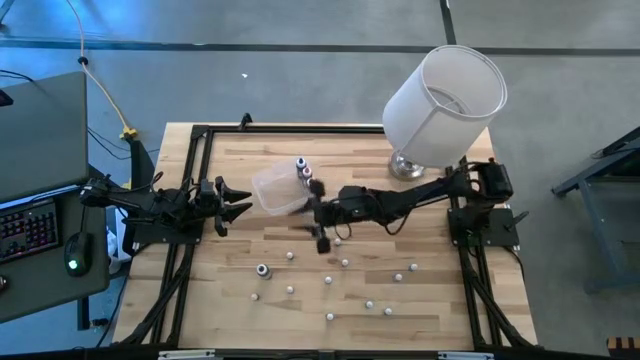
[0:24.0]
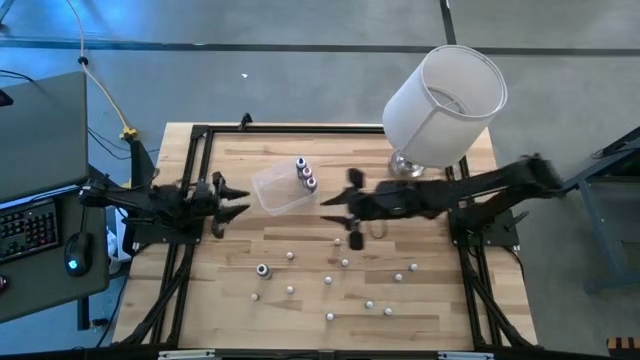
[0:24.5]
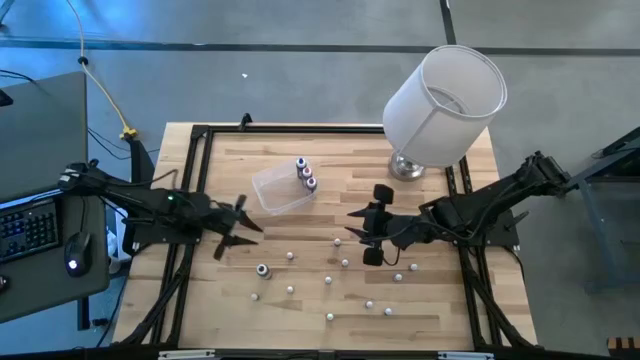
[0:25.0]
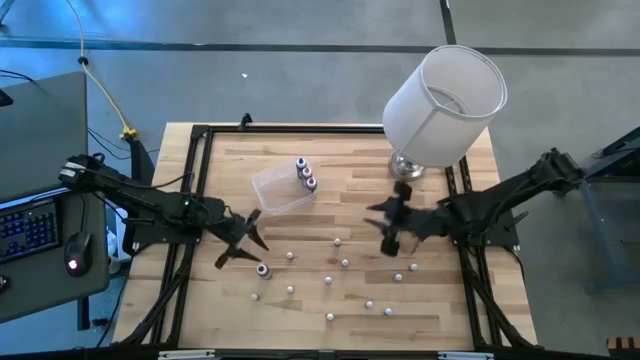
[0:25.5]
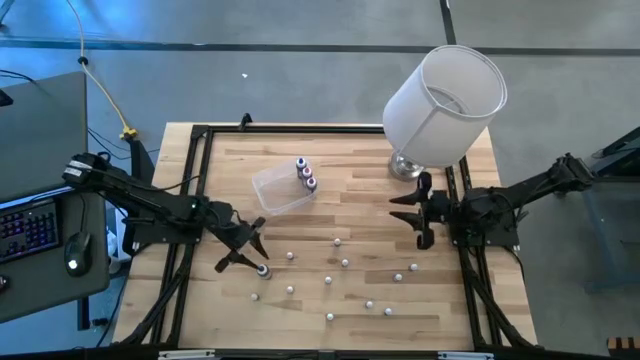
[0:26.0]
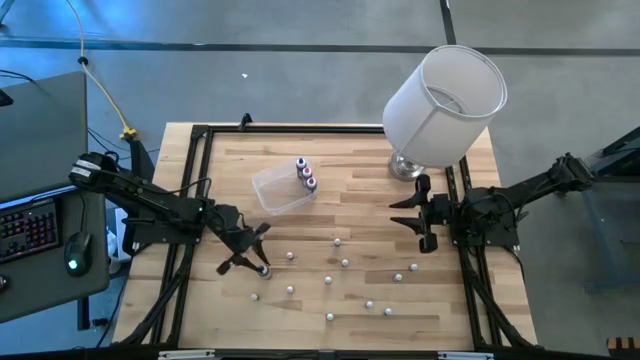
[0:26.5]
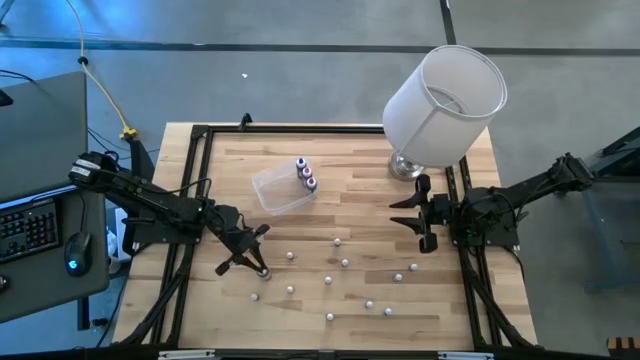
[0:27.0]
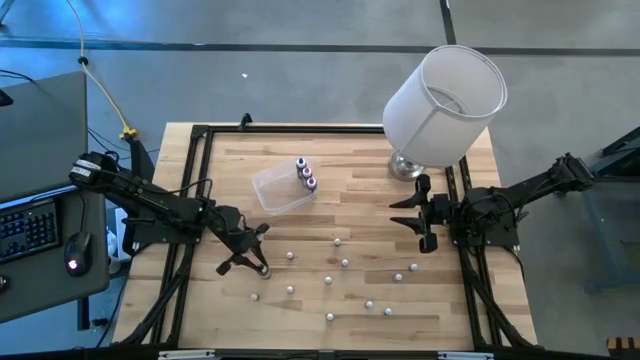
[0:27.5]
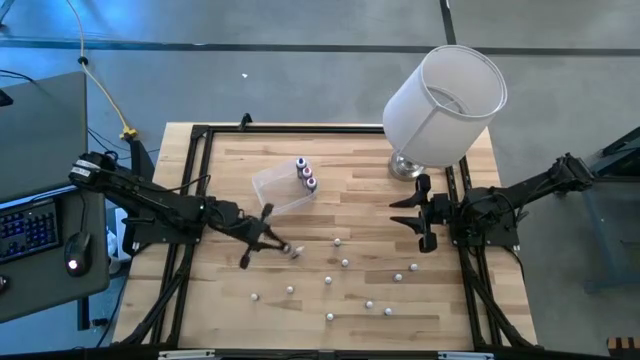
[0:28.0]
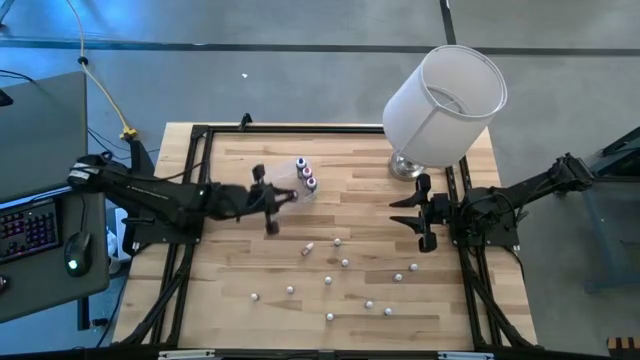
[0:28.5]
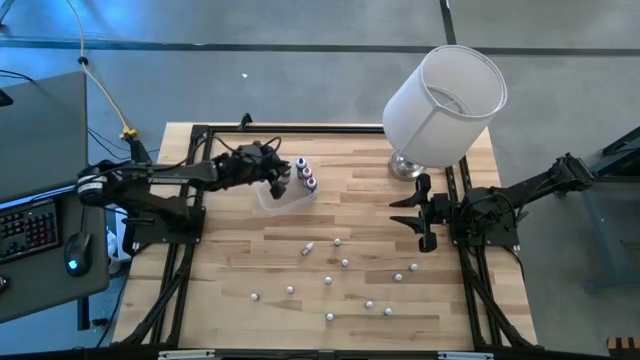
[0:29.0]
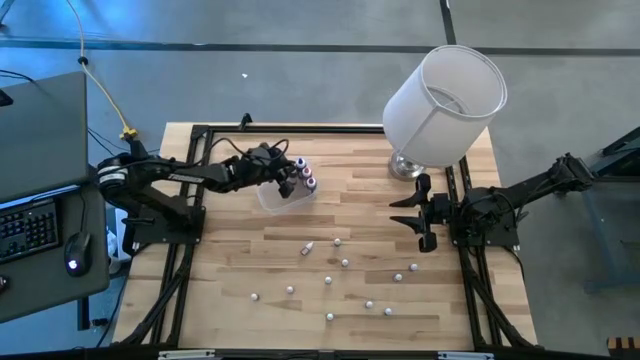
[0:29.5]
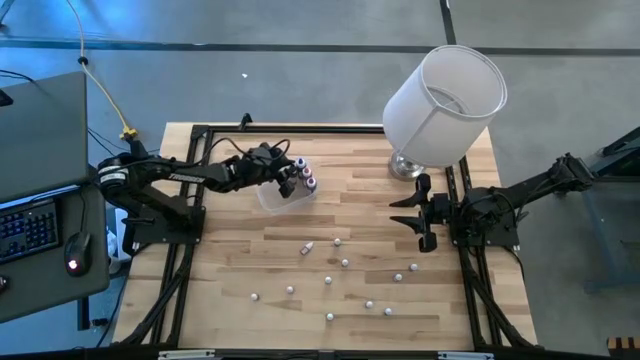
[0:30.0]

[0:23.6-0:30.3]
Task: Pick & Place food coloring
Put the big black food coloring bottle into the transparent bin

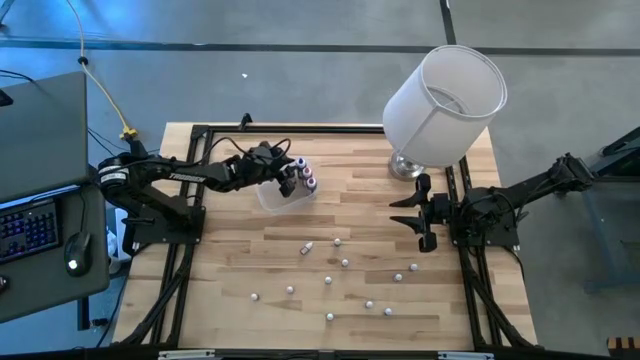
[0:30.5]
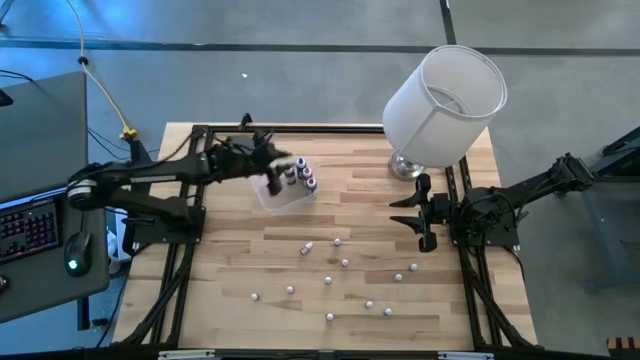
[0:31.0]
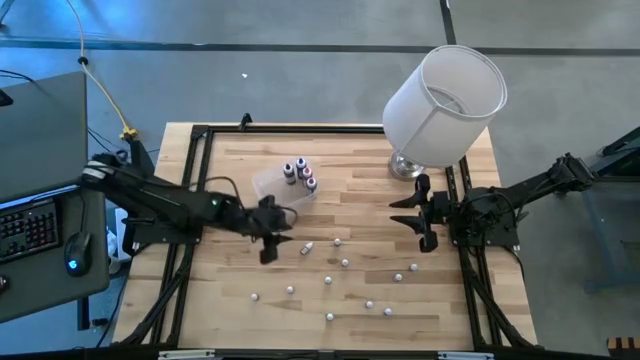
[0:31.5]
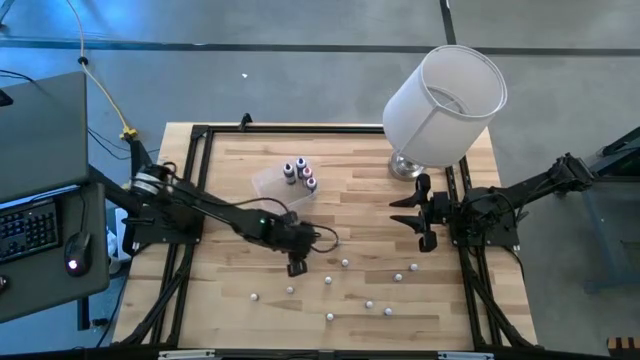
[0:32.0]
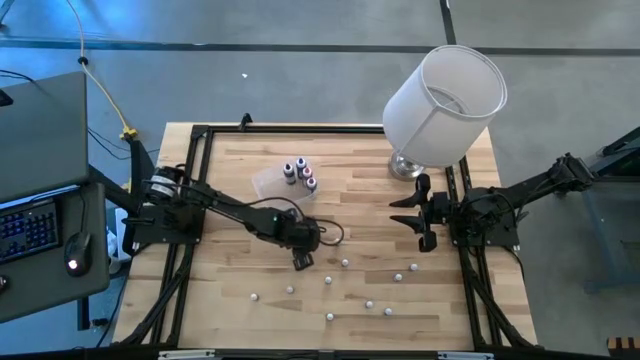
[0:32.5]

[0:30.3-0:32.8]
Put the small red food coloring bottle into the transparent bin

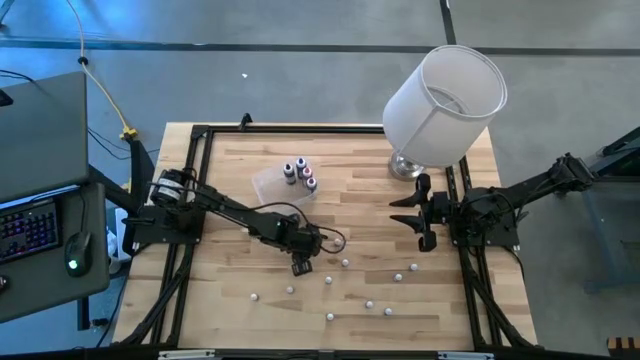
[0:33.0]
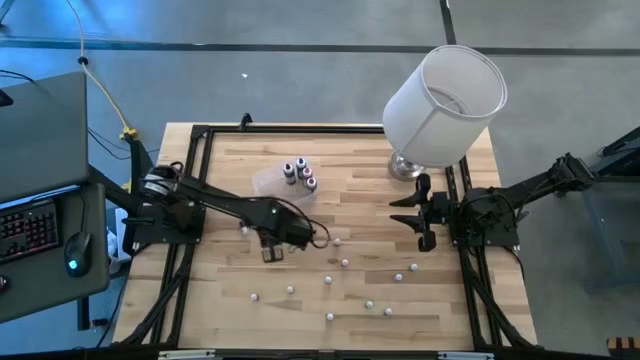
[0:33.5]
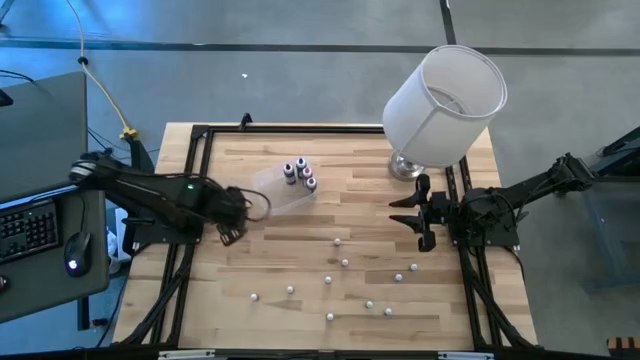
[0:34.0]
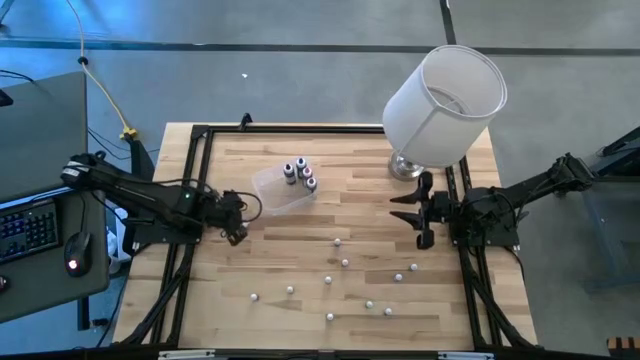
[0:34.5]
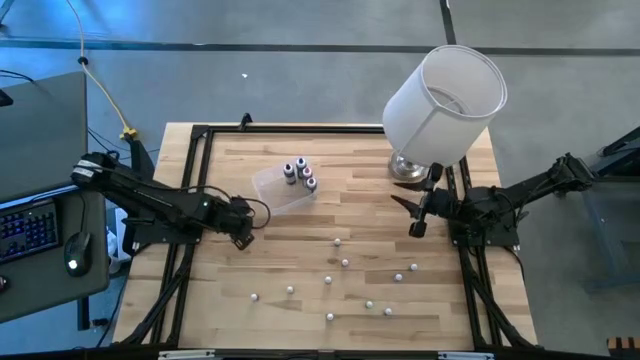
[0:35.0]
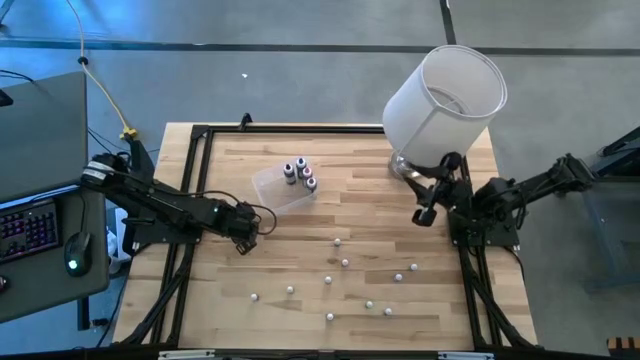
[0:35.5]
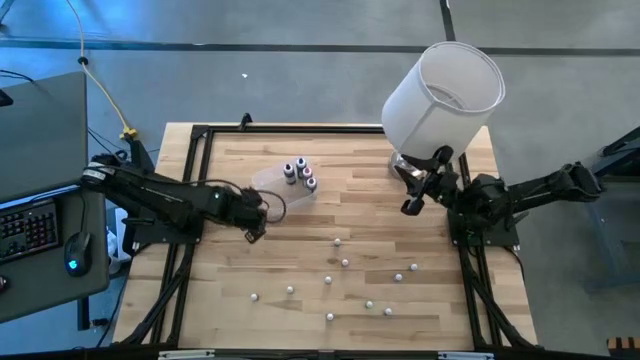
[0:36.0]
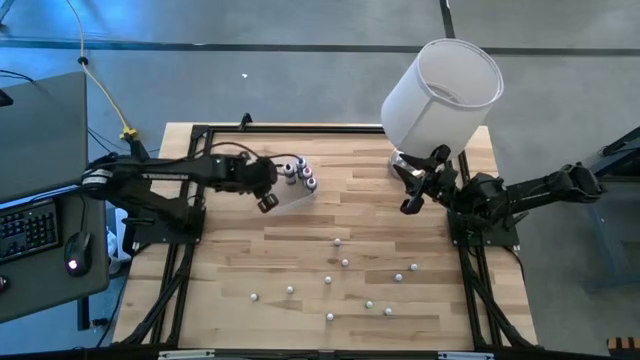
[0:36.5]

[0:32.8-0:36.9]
Put the small red food coloring bottle into the transparent bin

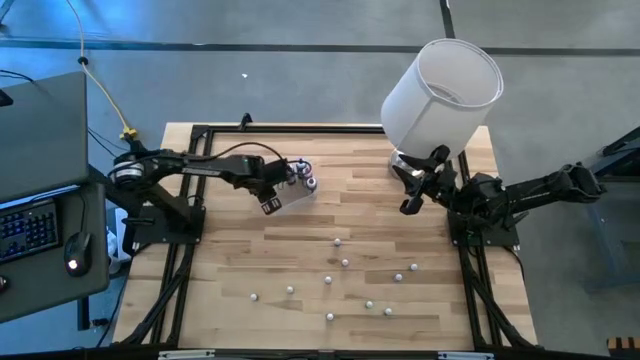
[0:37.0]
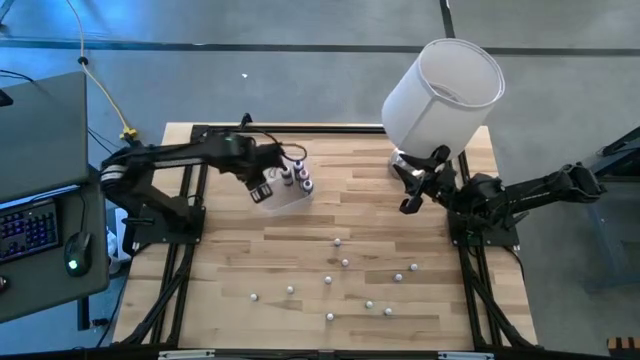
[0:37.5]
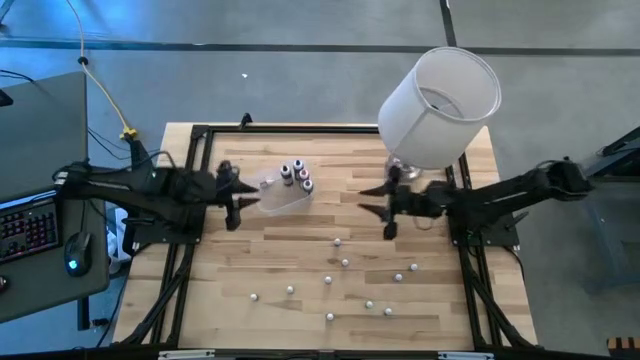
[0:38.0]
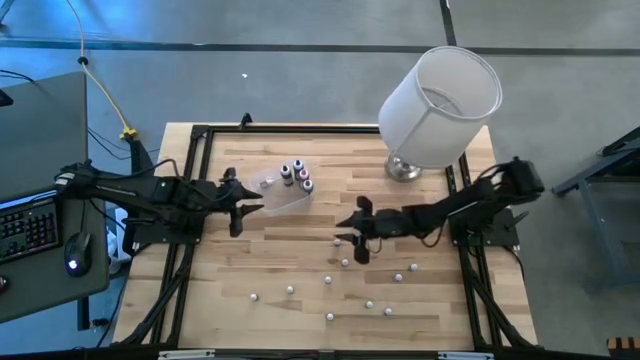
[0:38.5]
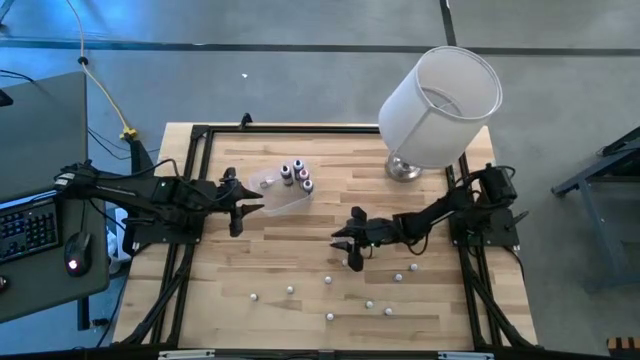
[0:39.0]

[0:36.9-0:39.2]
Put the small blue food coloring bottle into the transparent bin

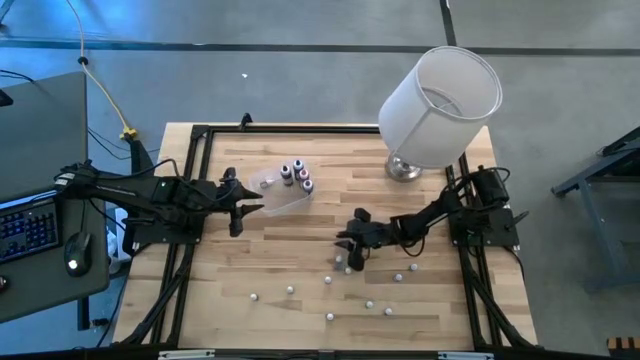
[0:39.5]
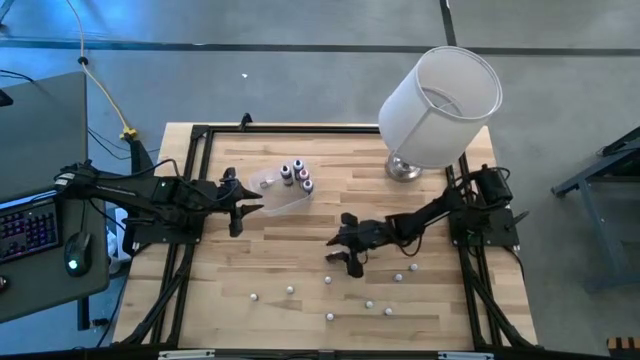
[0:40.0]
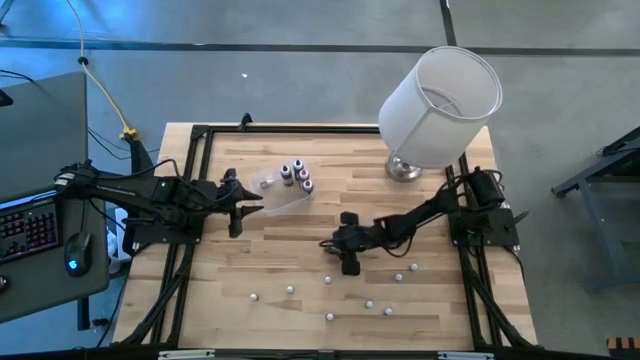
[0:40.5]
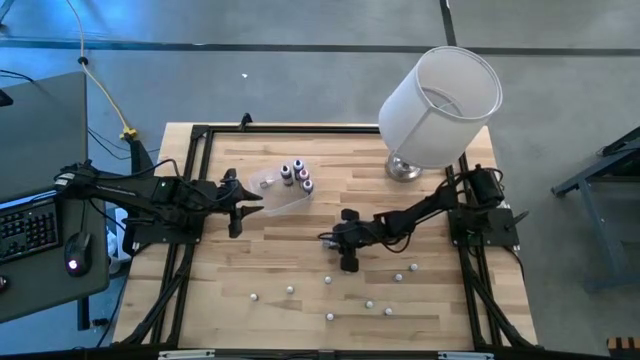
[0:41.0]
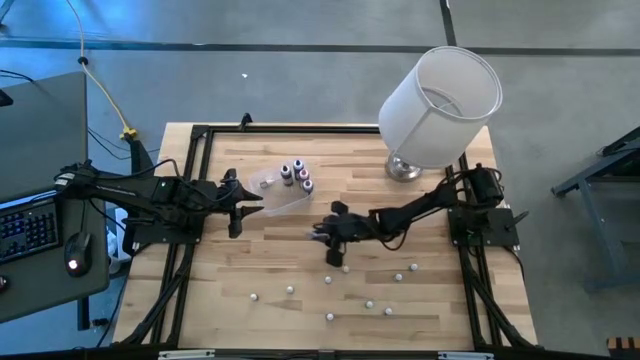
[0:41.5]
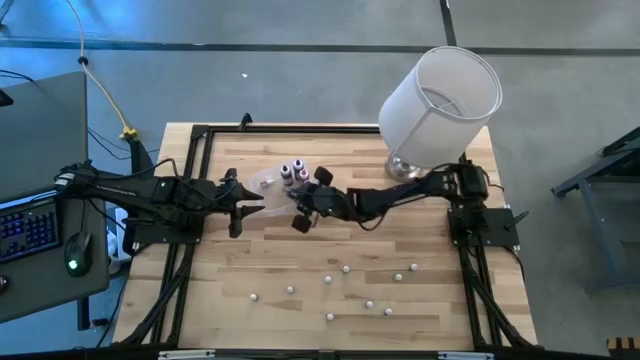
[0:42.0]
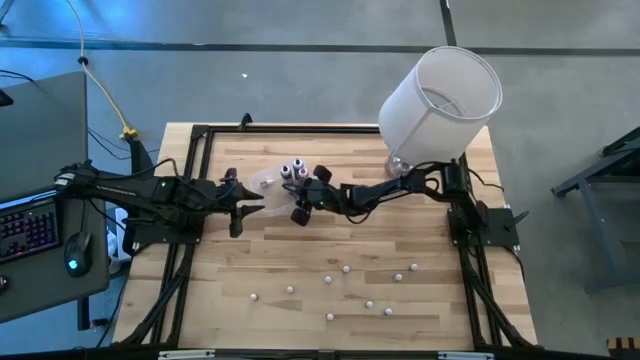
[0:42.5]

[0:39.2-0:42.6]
Put the small blue food coloring bottle into the transparent bin

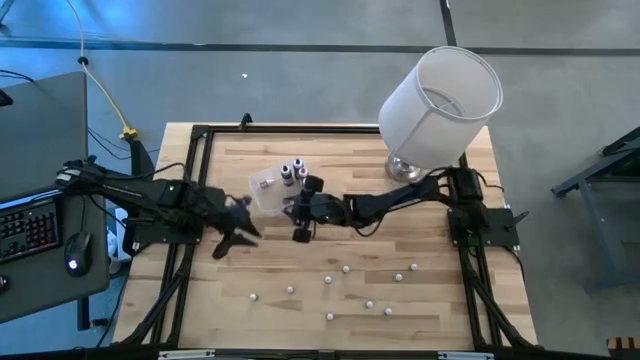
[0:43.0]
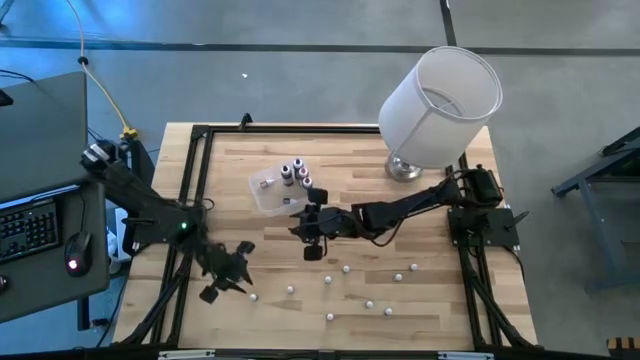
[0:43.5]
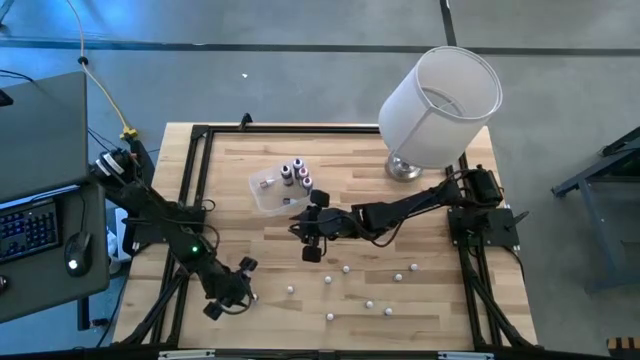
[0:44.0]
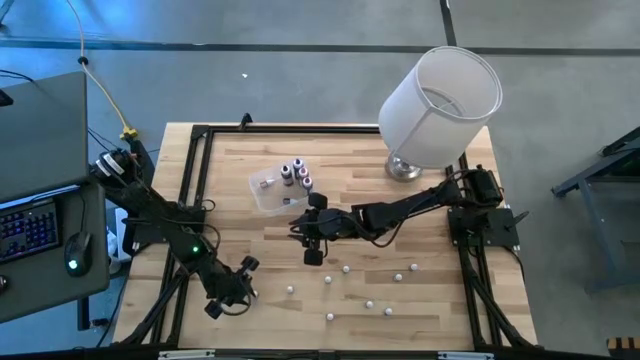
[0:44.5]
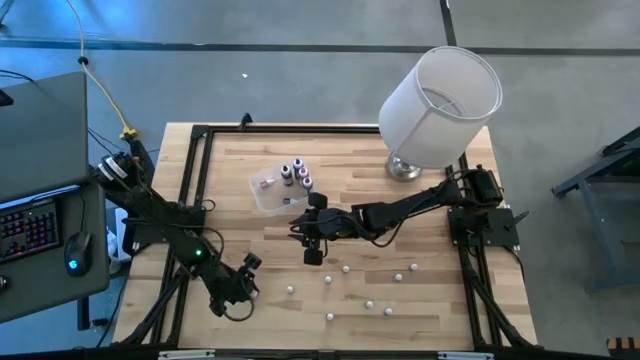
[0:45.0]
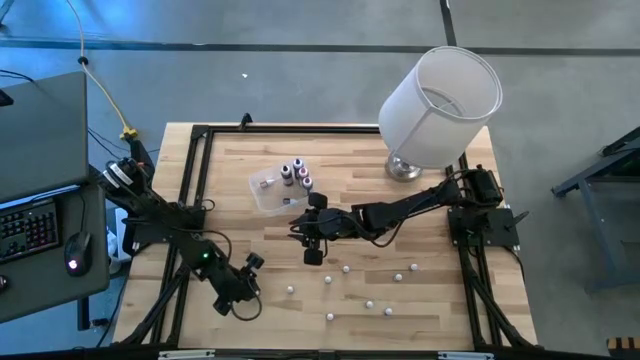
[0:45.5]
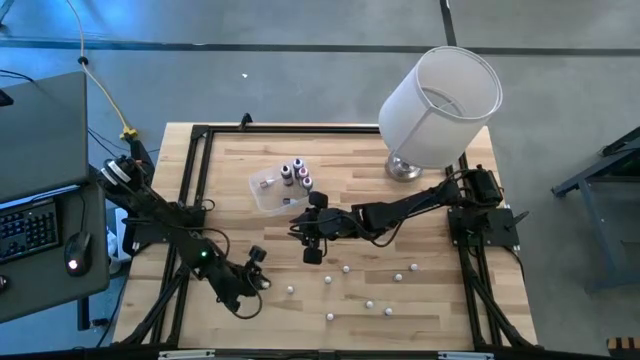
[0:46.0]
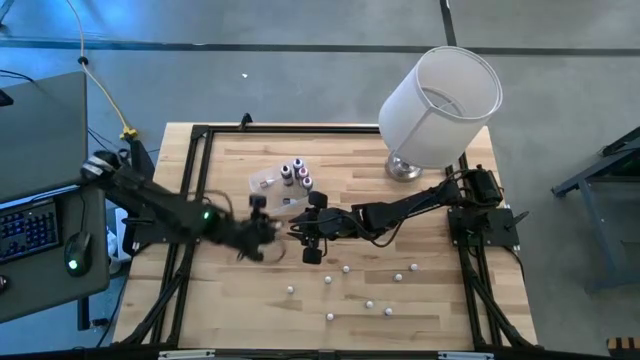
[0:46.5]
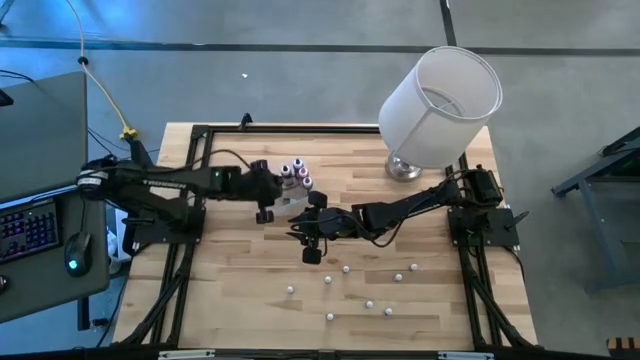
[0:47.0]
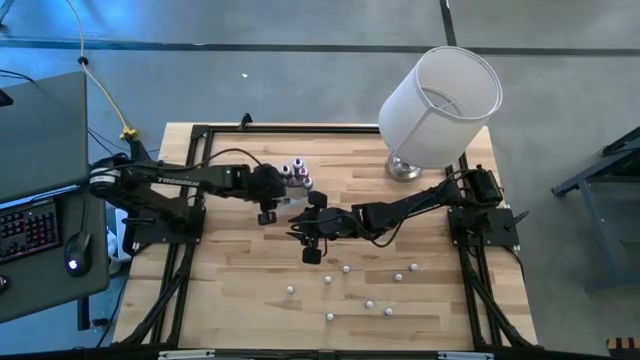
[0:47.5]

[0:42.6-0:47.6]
Put the small orange food coloring bottle into the transparent bin
